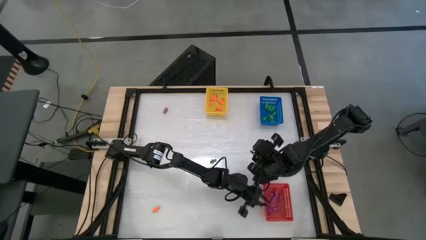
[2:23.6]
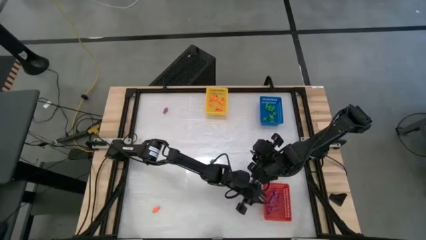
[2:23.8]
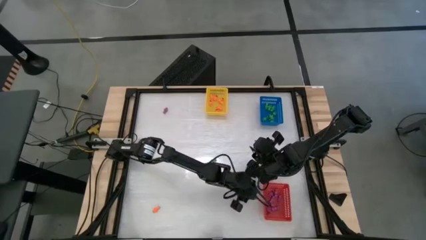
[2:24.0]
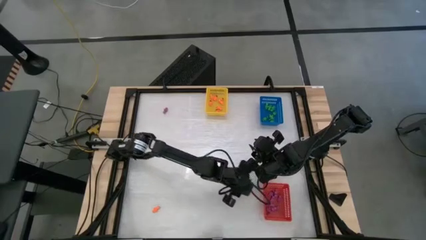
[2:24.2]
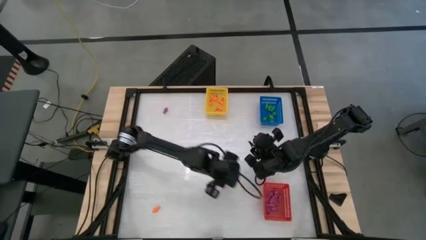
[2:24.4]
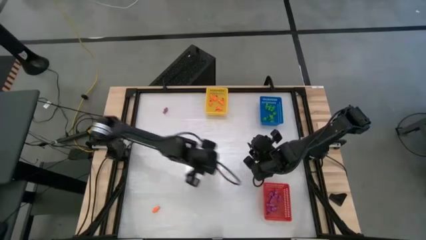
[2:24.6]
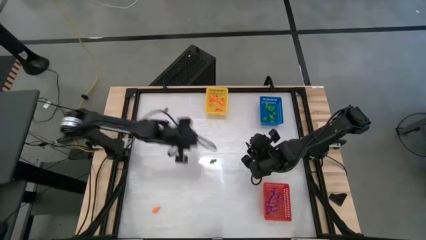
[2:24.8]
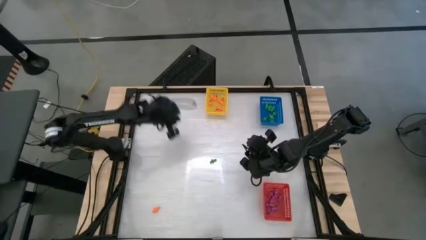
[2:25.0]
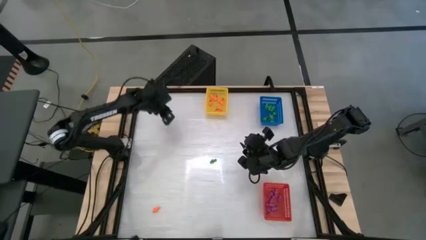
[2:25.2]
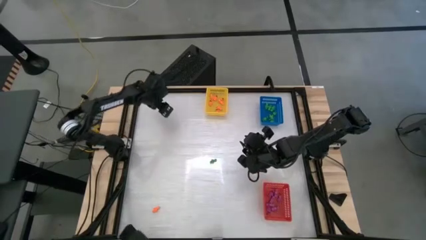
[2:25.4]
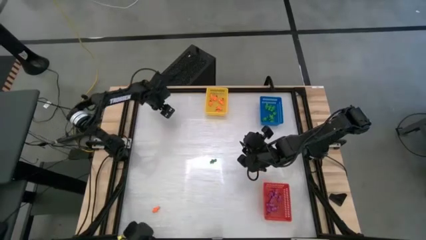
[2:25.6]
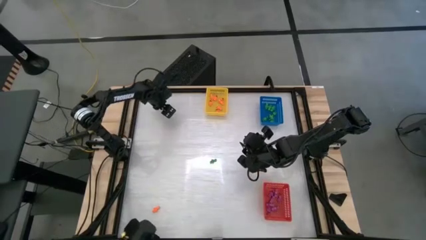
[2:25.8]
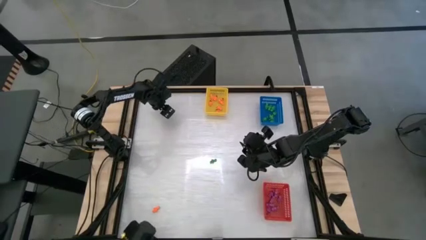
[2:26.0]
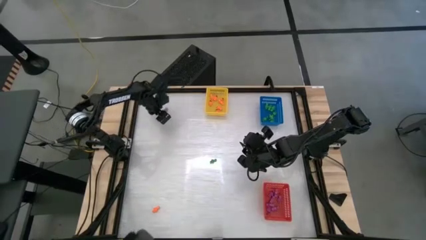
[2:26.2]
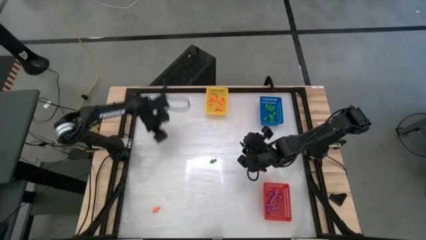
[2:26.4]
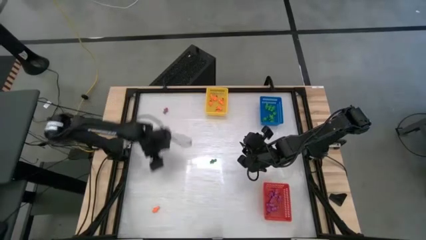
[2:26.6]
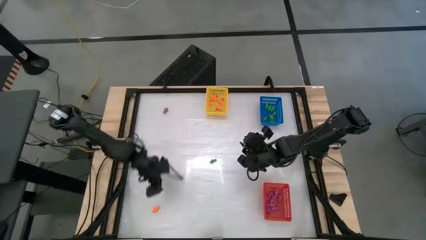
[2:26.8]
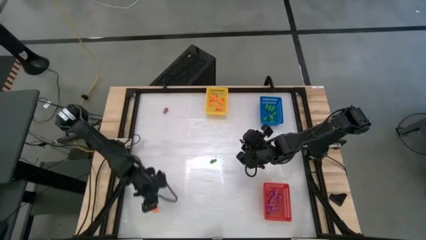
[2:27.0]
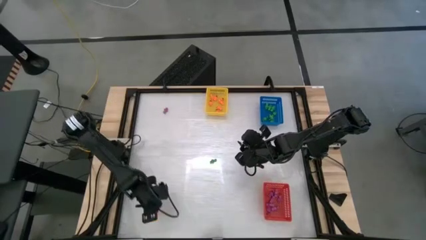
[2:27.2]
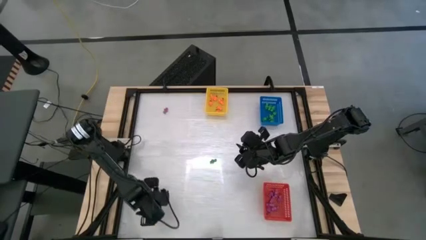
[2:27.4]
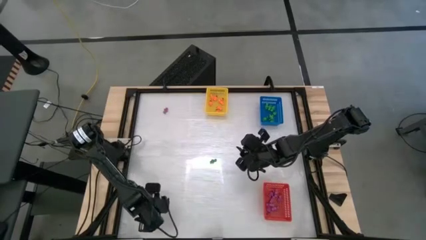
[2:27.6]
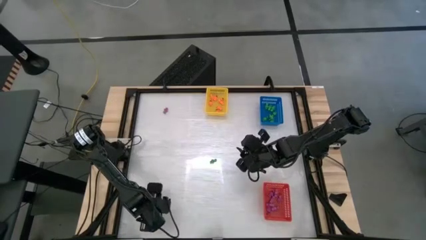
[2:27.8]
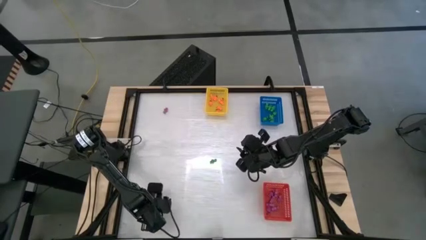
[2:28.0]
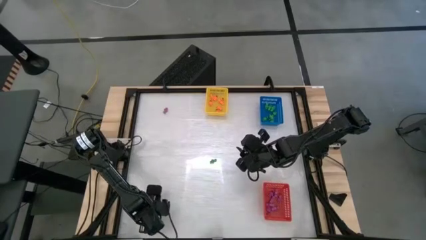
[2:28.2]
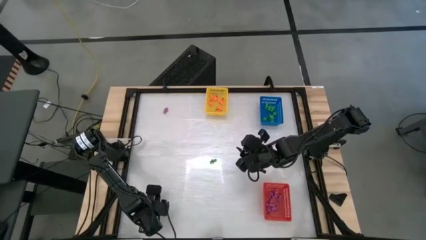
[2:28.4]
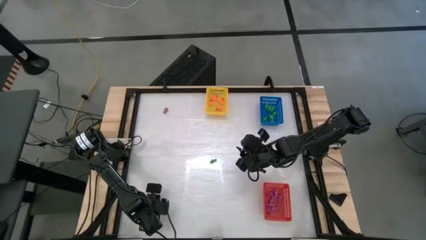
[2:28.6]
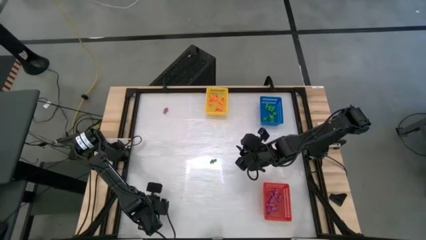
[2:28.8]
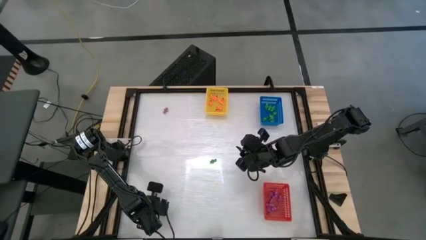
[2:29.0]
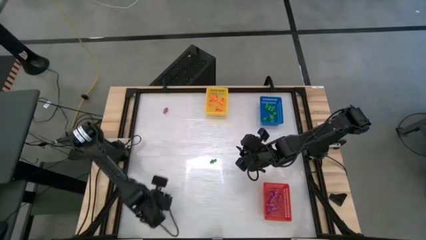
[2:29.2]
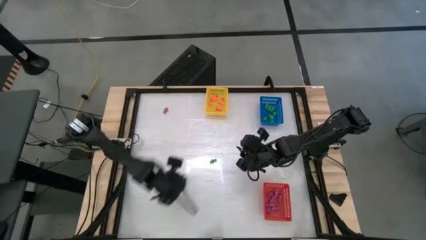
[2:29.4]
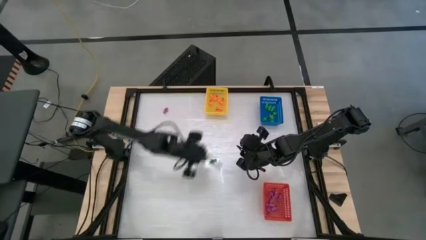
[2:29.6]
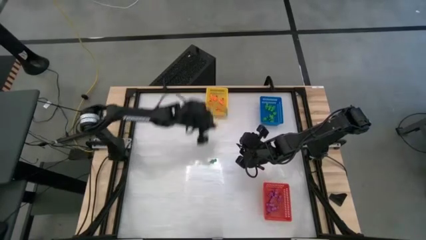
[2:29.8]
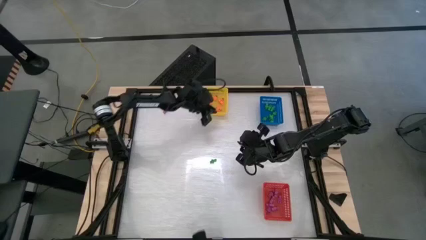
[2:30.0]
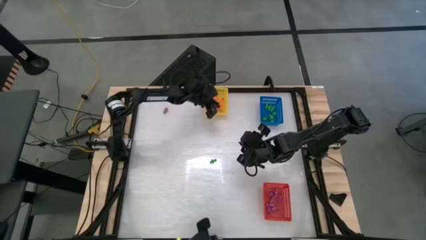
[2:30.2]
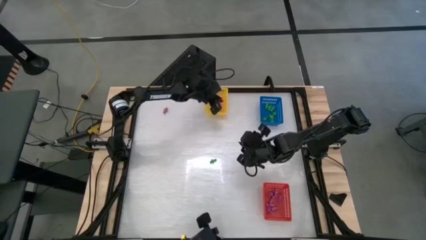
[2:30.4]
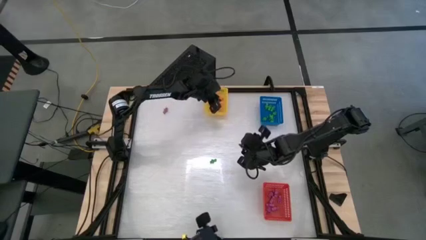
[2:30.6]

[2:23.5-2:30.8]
Task: Sort Halloween decoration
Put the orange skeleton toy into the yellow bin

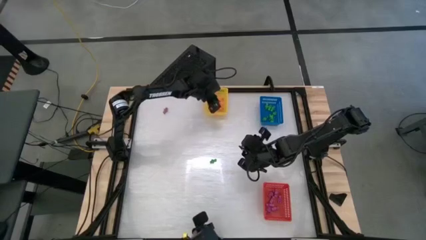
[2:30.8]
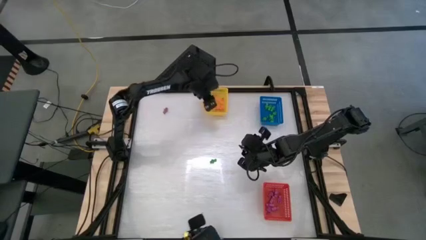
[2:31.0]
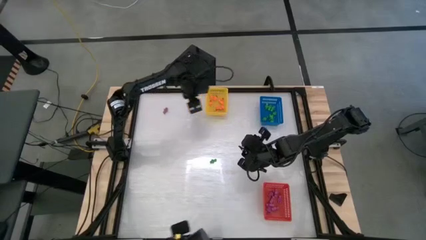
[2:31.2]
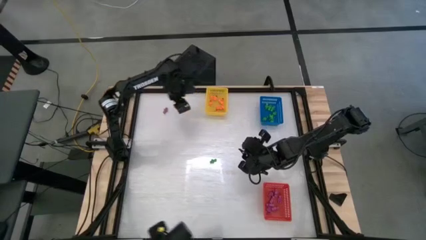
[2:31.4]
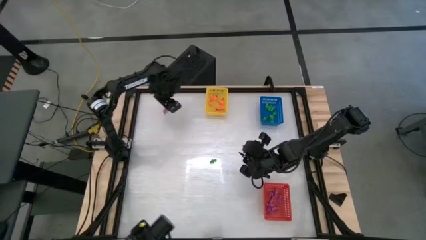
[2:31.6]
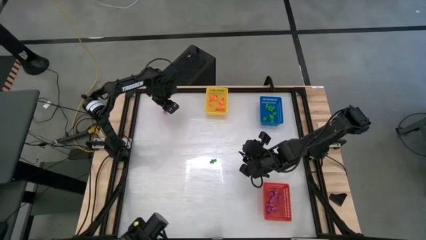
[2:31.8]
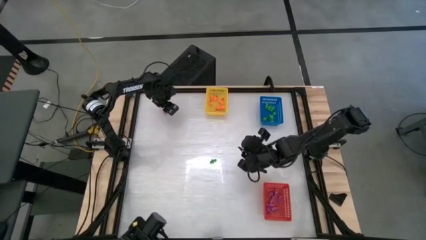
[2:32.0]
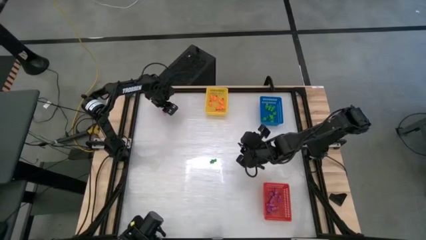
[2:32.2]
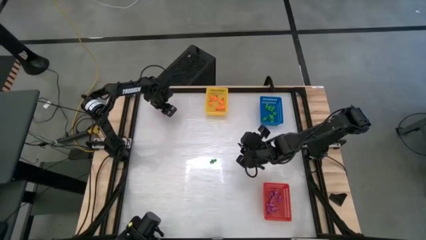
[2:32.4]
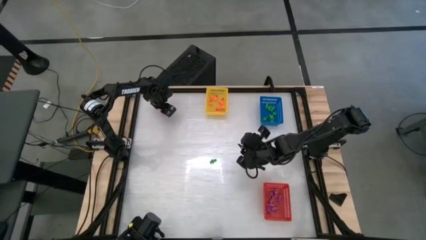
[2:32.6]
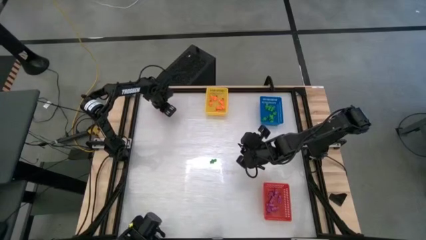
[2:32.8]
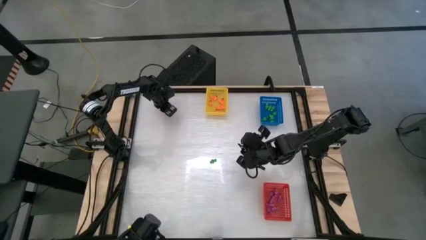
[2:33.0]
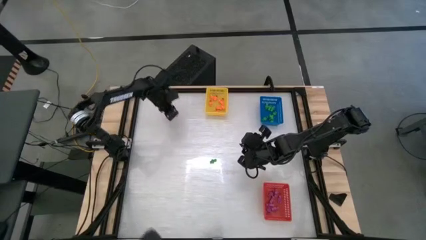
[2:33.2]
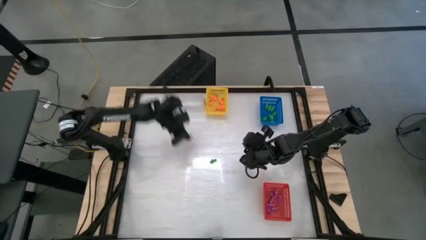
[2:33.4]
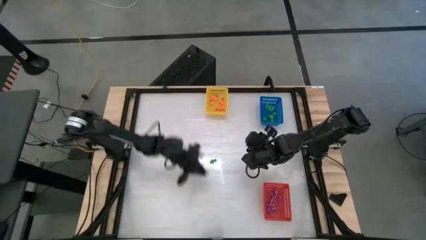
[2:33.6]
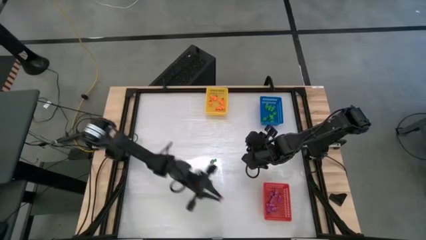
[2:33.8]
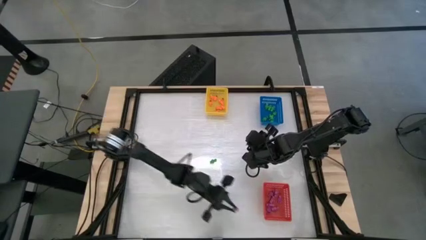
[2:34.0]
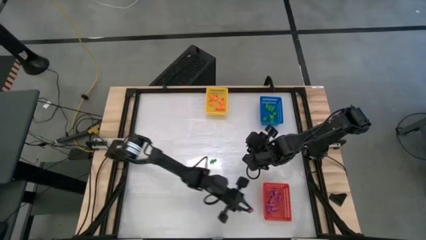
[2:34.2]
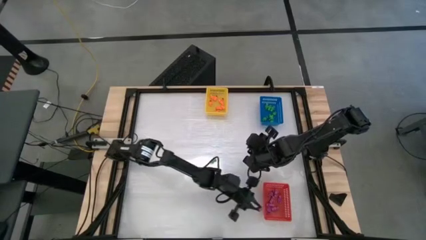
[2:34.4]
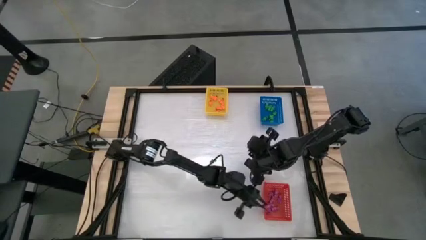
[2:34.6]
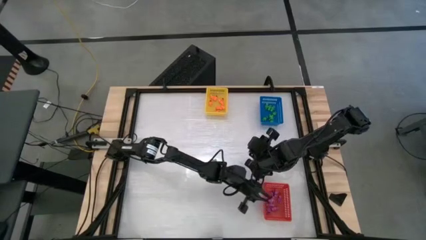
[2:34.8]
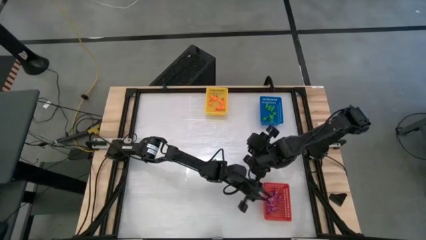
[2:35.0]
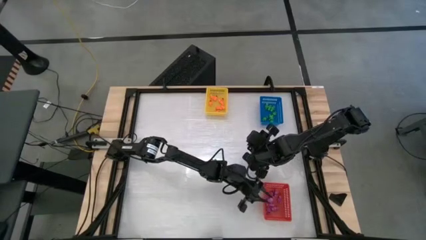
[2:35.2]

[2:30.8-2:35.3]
Put the violet skeleton toy into the red bin

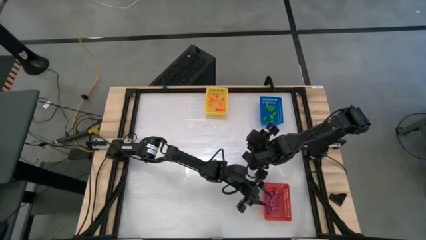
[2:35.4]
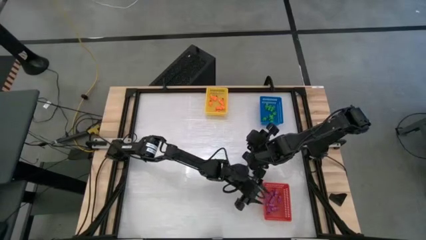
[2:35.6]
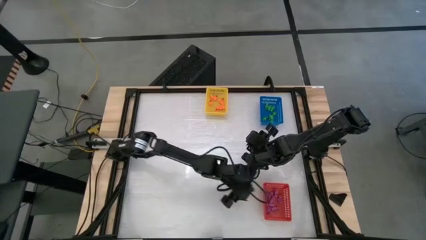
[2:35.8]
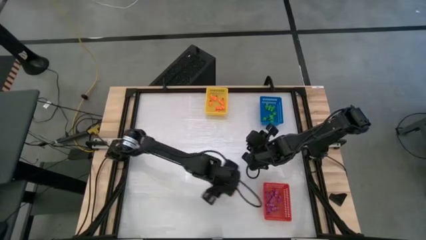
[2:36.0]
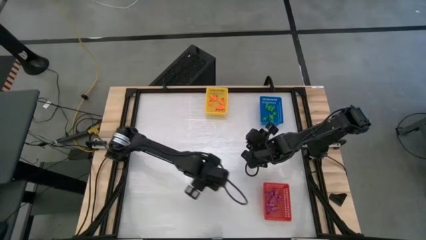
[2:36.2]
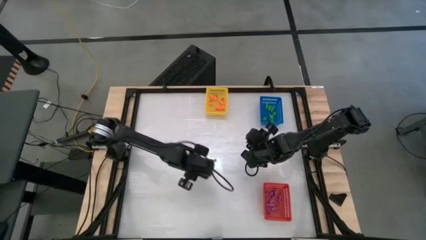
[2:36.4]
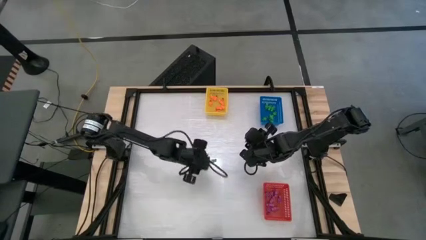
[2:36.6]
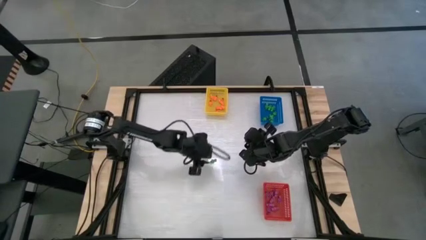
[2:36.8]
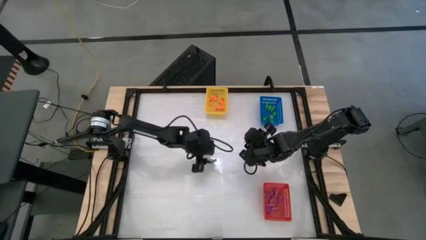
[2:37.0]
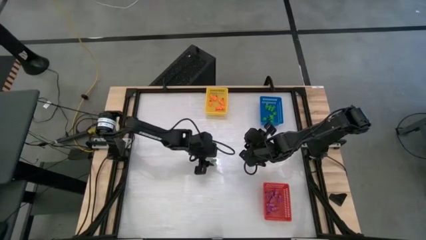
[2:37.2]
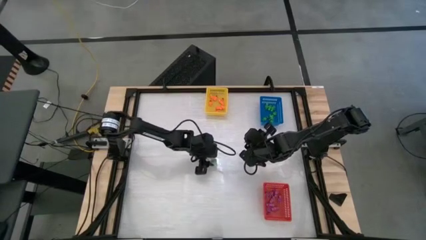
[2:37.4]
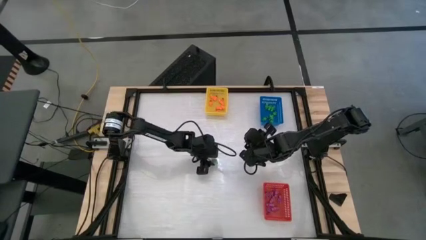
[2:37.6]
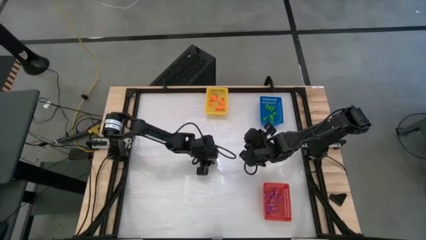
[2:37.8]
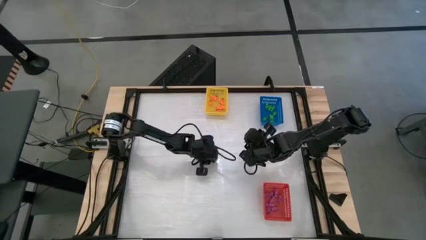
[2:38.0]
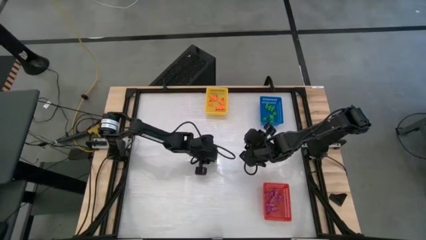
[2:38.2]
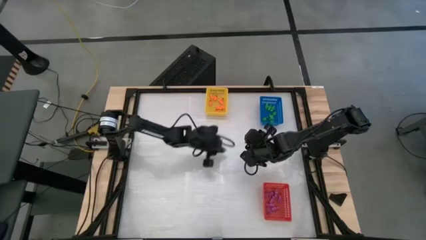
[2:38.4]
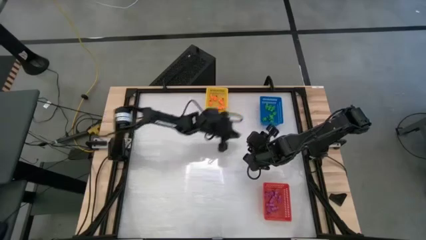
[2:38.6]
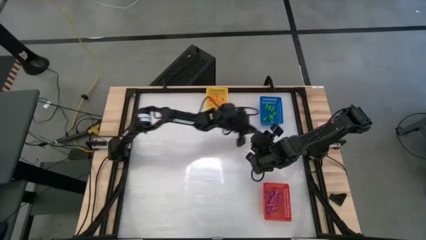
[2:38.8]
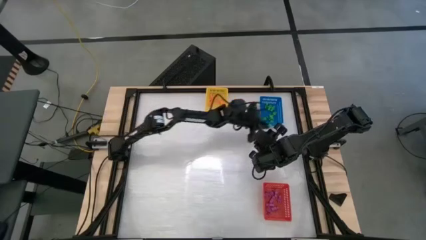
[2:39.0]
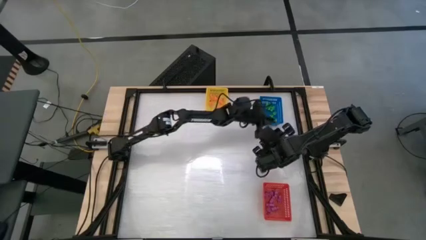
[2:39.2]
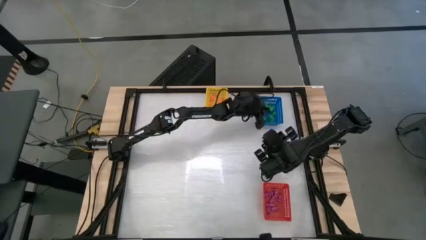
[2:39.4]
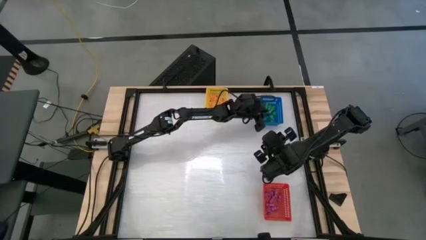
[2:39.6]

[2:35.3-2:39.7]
Put the green skeleton toy into the blue bin
